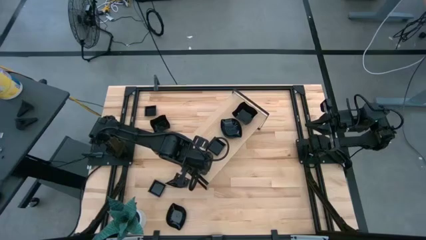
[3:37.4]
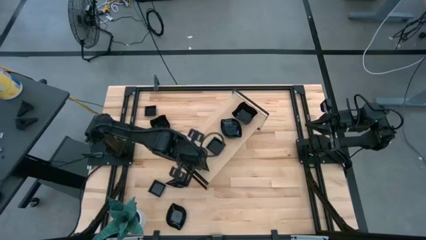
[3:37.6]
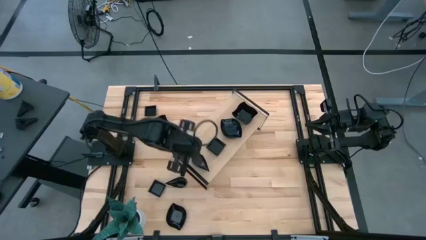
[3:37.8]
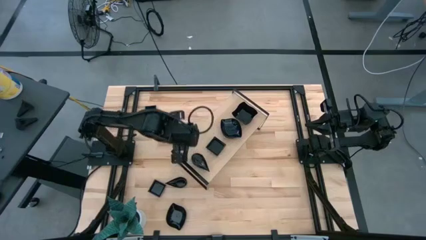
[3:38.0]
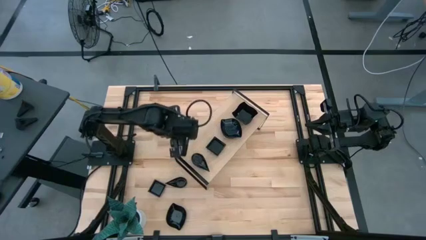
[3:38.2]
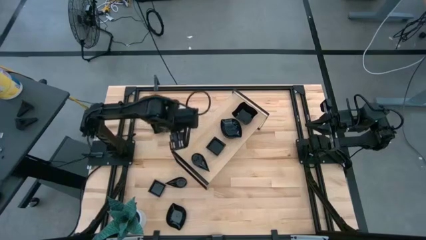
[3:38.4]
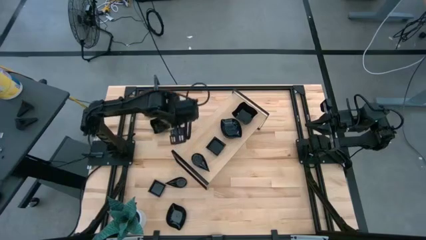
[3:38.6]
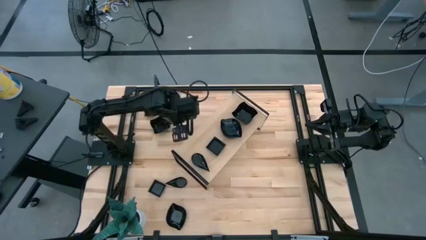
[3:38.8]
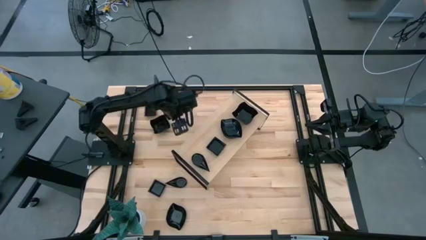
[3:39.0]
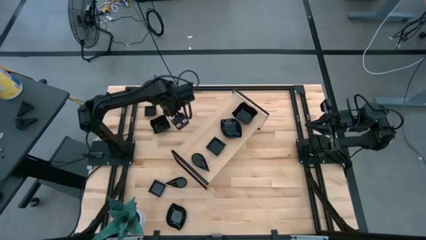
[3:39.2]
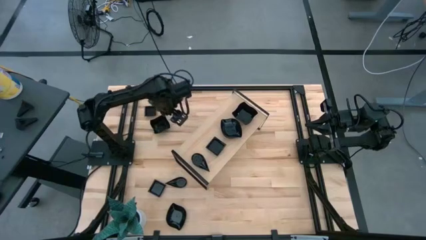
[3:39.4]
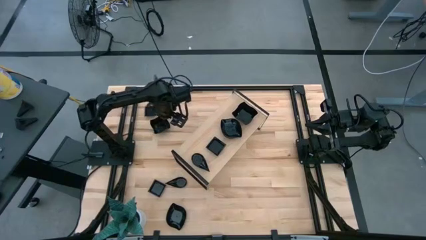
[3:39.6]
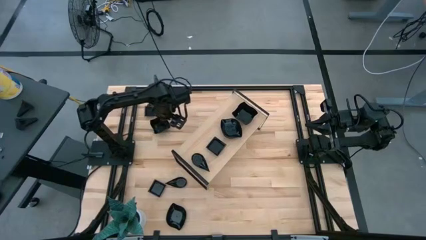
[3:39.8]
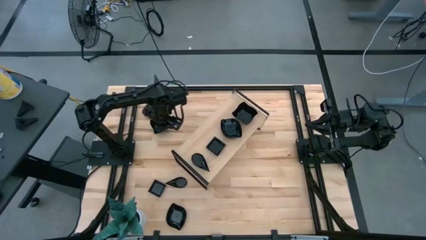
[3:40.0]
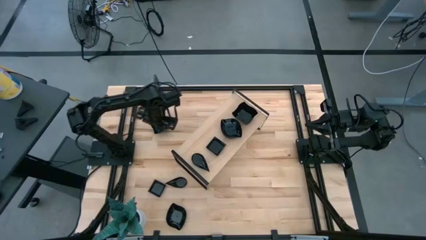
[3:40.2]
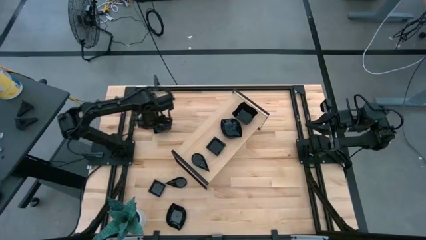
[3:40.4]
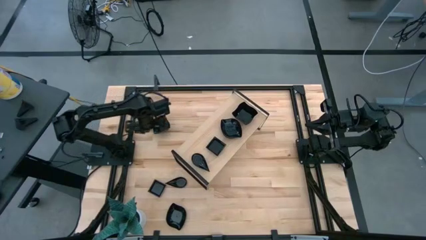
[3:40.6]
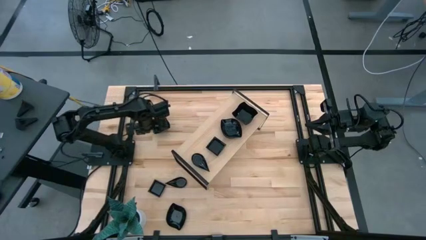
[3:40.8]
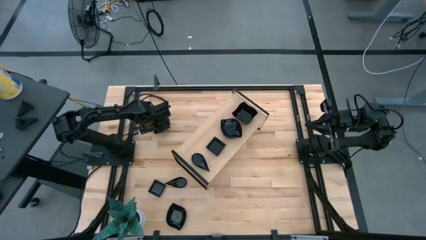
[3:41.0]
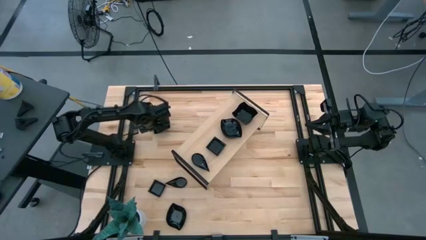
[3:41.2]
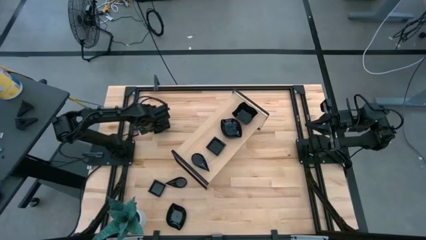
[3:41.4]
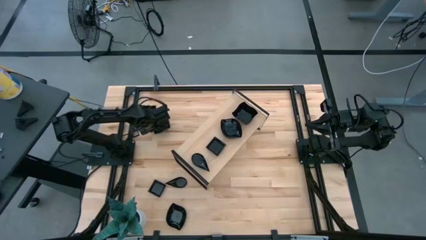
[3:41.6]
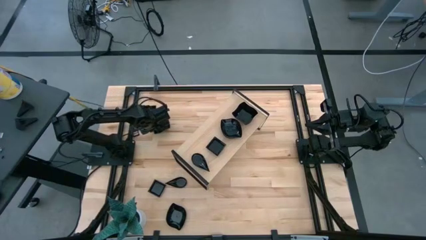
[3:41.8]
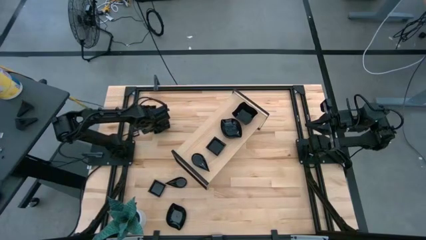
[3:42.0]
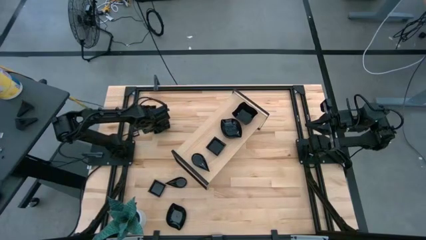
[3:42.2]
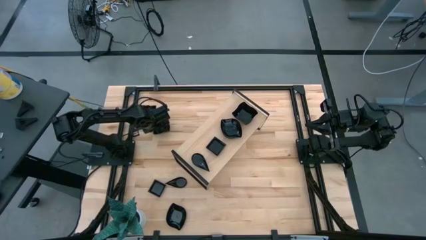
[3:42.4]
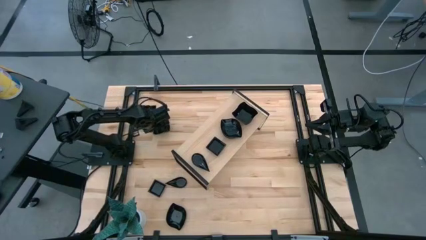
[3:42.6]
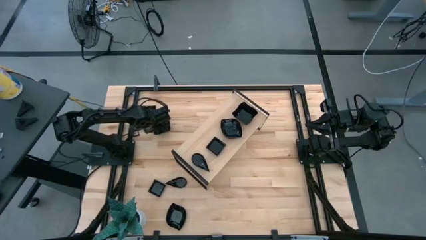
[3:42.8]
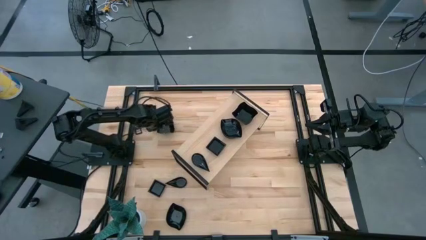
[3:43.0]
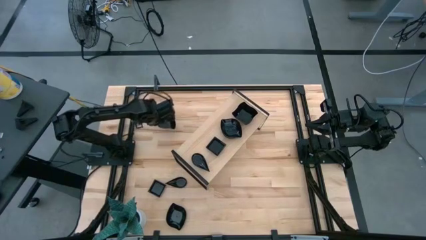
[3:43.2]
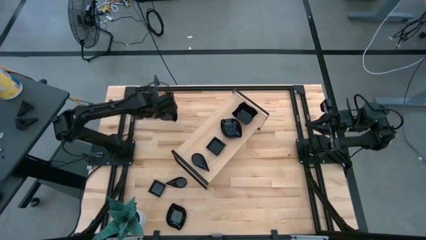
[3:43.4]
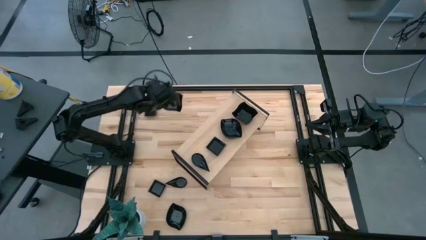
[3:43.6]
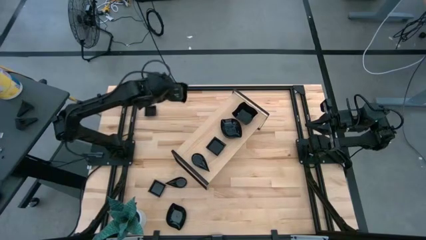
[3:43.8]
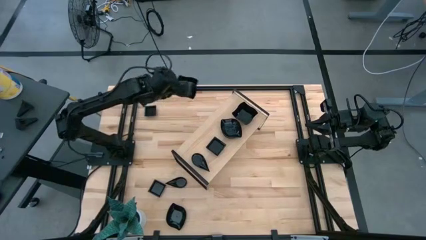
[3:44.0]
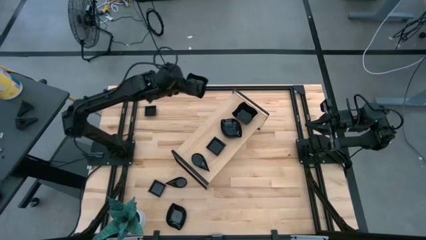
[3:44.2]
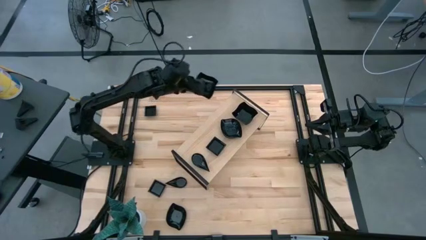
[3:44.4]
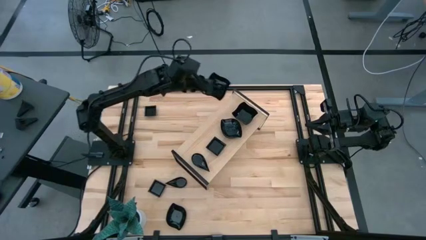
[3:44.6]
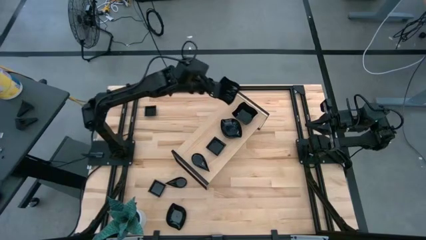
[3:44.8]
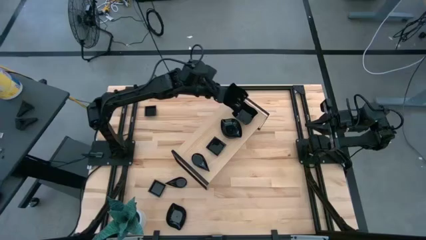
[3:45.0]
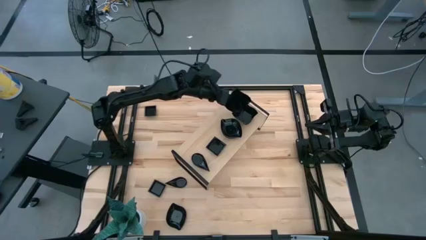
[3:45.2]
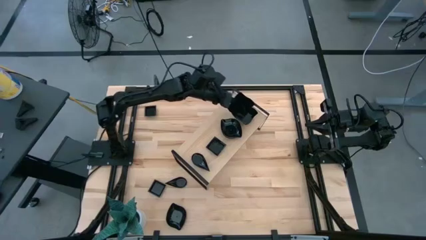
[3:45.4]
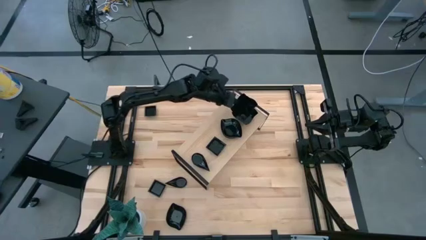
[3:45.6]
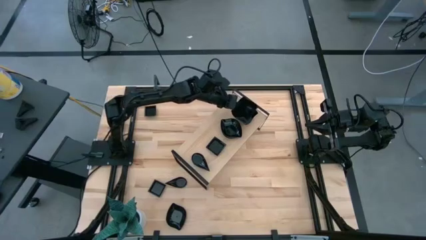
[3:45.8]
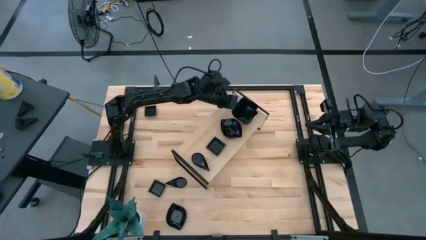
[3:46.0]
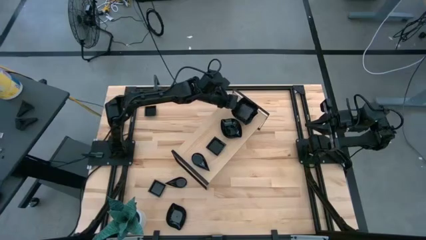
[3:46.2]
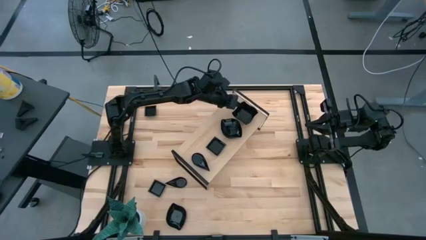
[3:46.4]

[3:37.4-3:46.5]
Task: Pick & Place Mini shaped plates
Stack the black wave square shaped bowl on top of the black wave square shaped bowl on the shelf

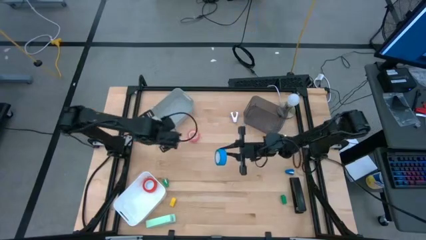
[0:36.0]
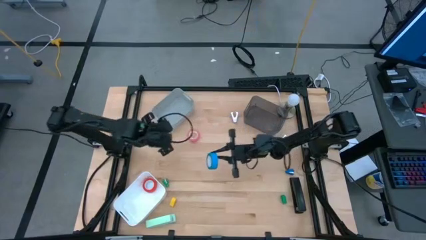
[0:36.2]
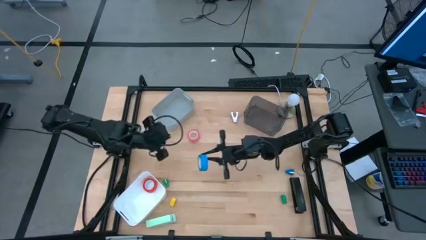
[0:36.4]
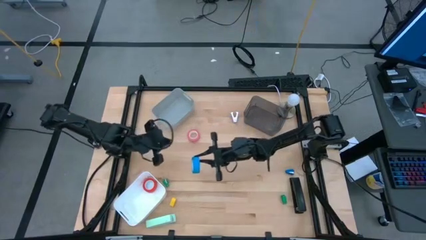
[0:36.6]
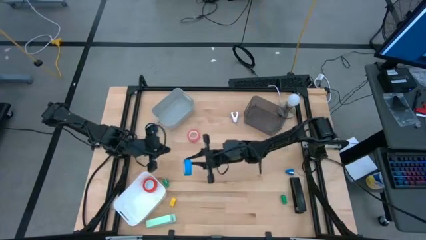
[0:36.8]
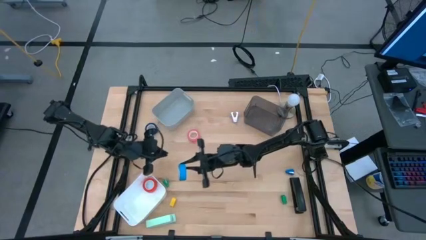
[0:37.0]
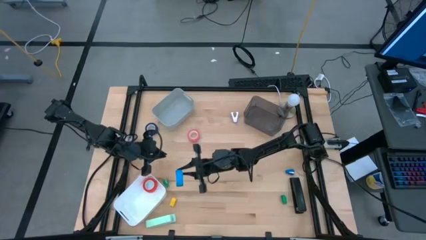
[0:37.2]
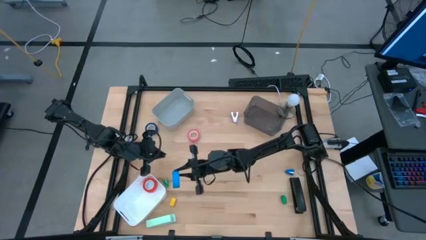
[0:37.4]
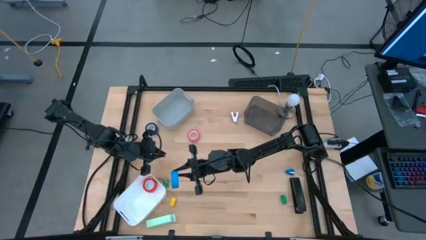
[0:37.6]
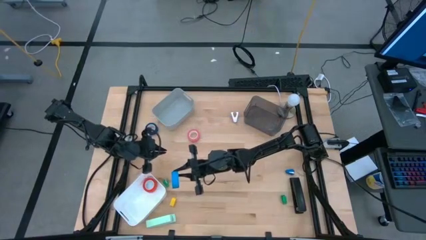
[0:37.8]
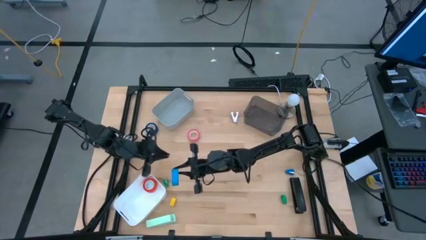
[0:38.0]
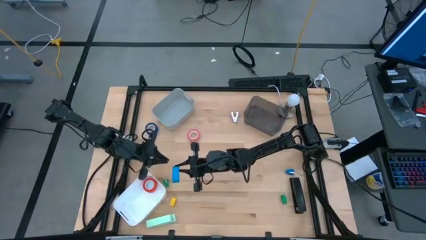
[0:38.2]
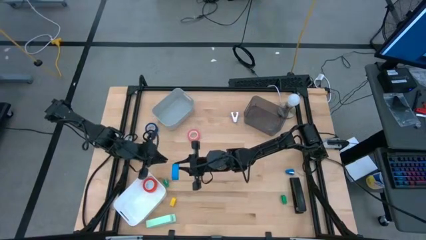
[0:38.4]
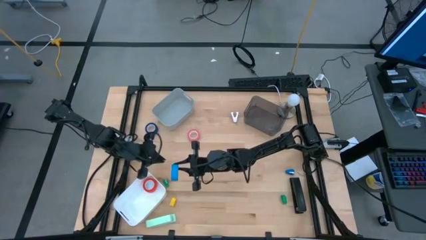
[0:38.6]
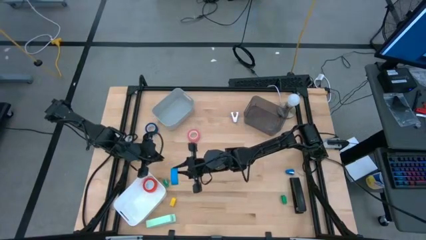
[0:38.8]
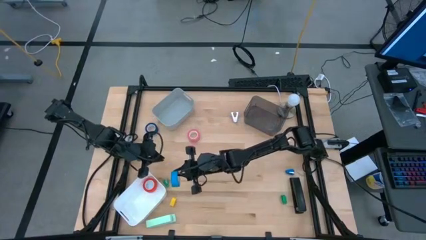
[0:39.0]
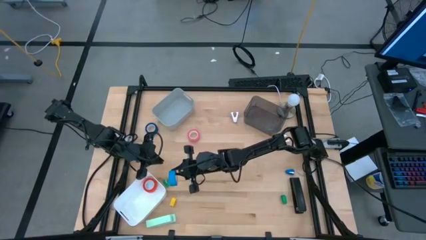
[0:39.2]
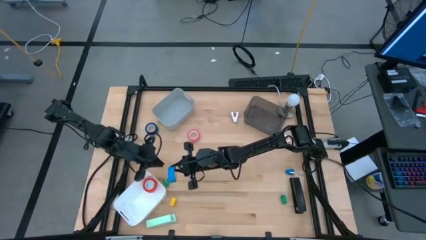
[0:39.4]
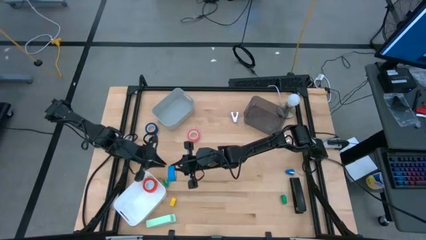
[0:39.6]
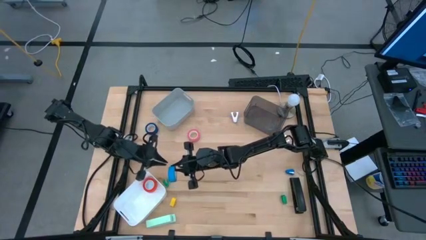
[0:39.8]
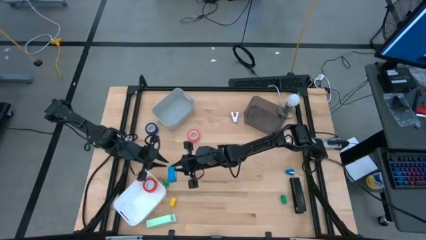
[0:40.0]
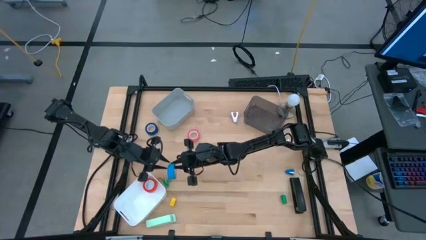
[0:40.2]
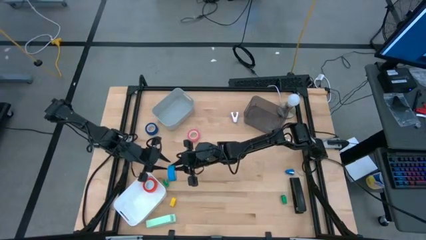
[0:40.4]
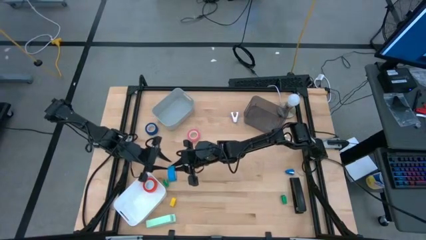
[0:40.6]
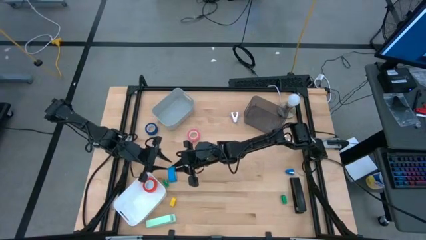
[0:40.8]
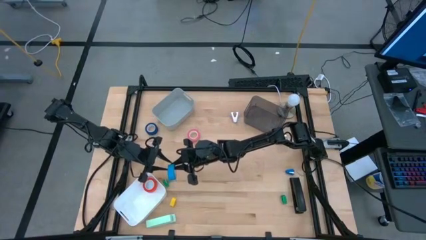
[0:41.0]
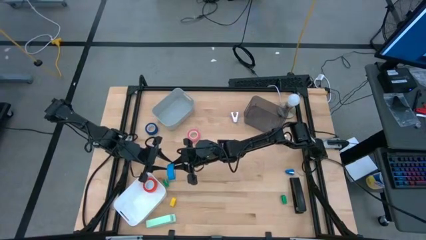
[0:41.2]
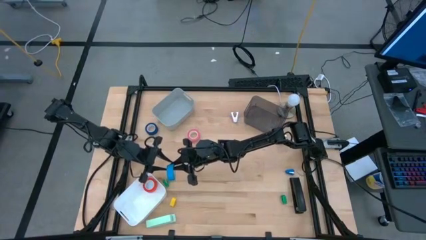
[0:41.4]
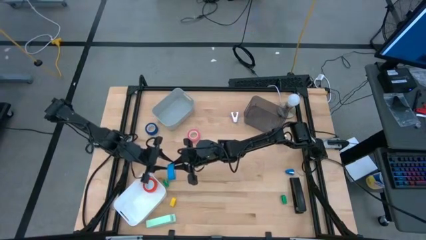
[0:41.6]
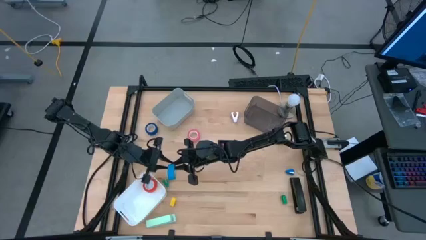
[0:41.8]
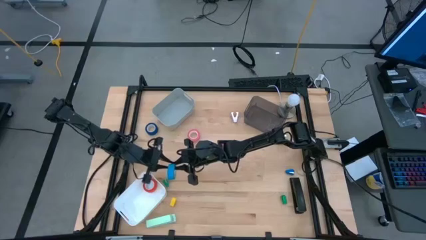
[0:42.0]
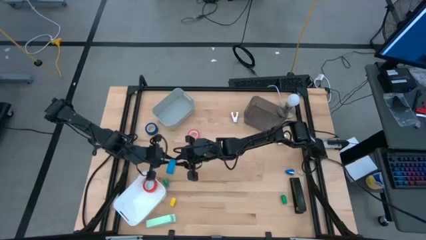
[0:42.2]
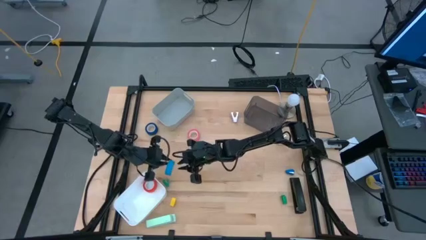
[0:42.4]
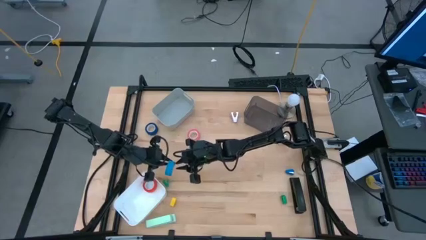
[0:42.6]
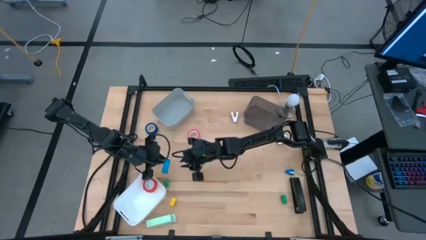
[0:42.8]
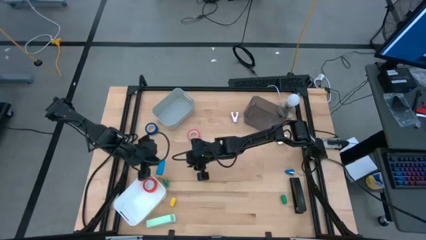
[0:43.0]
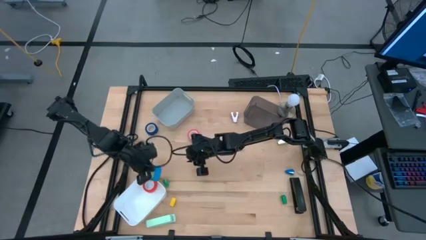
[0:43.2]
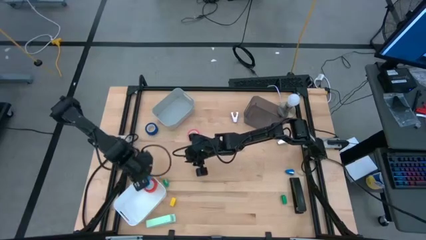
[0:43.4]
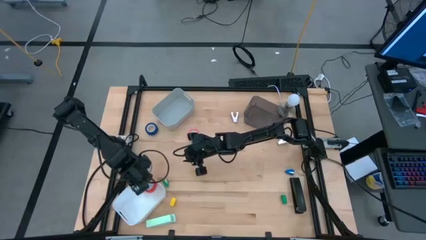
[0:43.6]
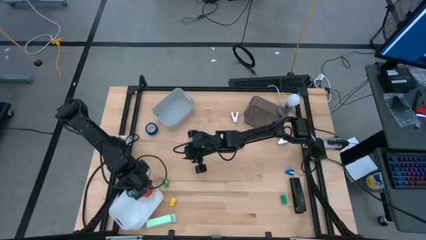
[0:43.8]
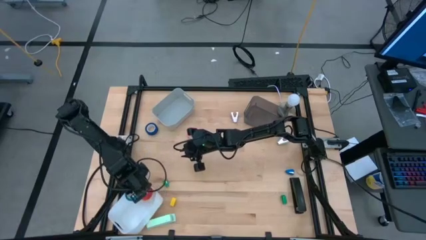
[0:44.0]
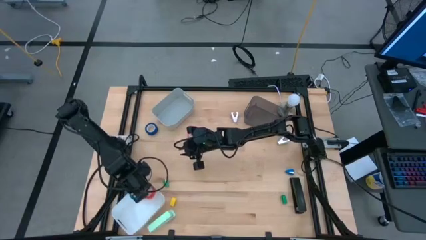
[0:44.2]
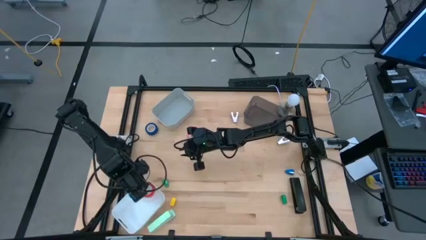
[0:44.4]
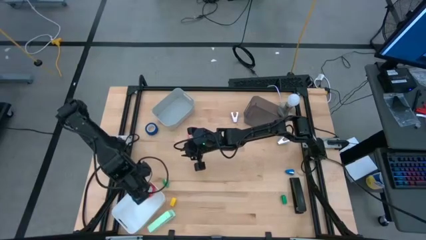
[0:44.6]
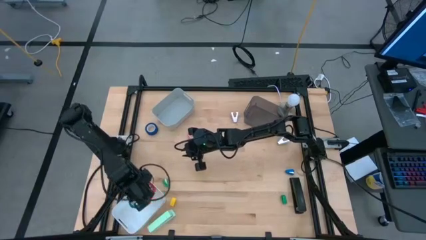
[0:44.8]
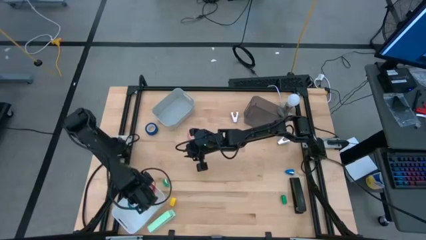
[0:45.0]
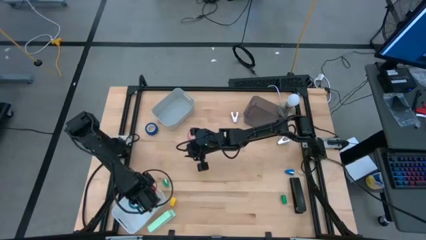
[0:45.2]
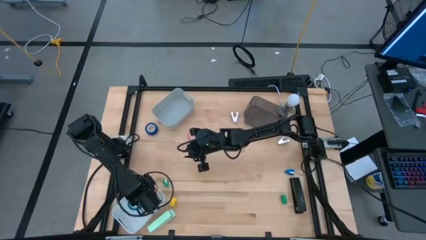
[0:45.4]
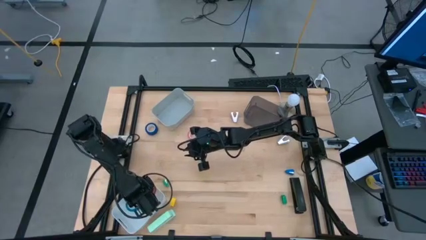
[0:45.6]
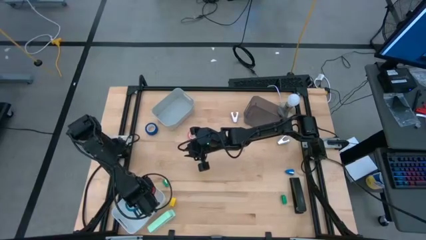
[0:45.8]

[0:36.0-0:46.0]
Task: Pick and place Stapler, Stapler remover, tape
Put the light blue tape into the white bin
